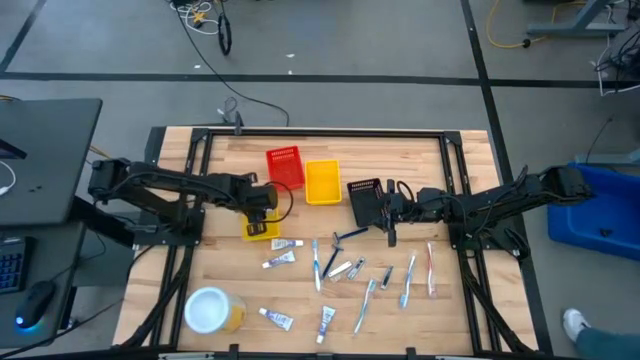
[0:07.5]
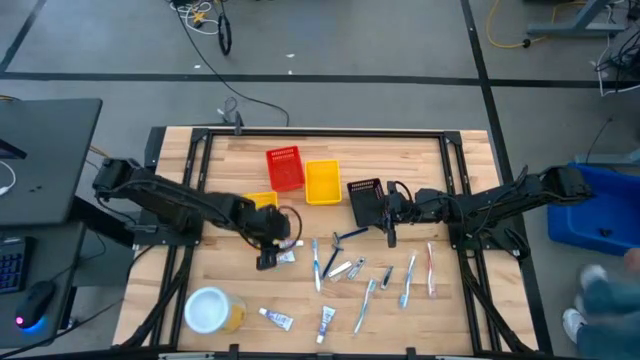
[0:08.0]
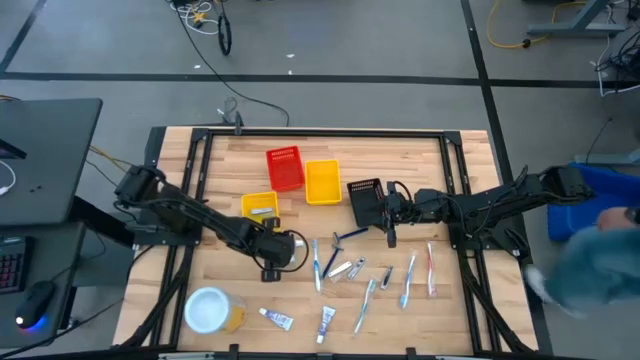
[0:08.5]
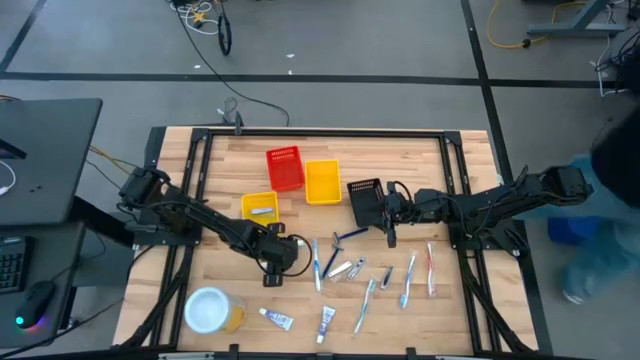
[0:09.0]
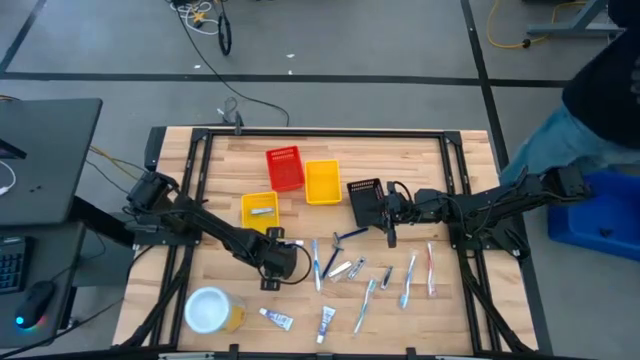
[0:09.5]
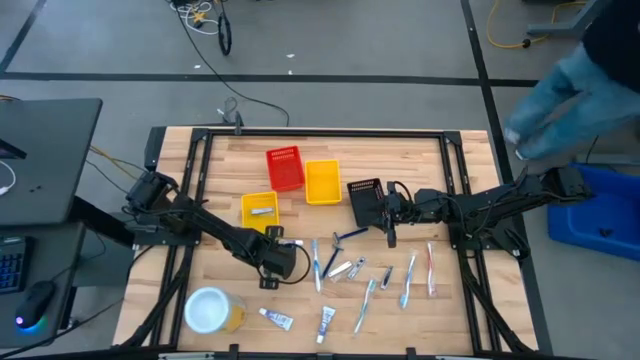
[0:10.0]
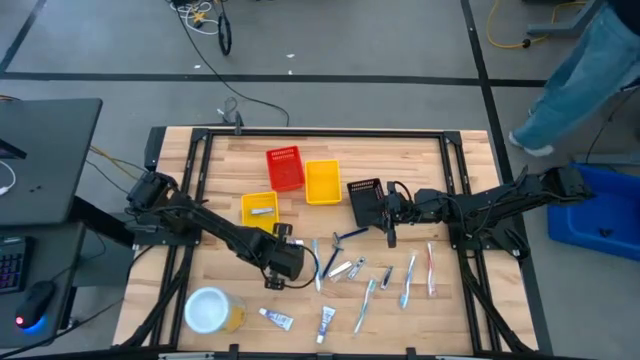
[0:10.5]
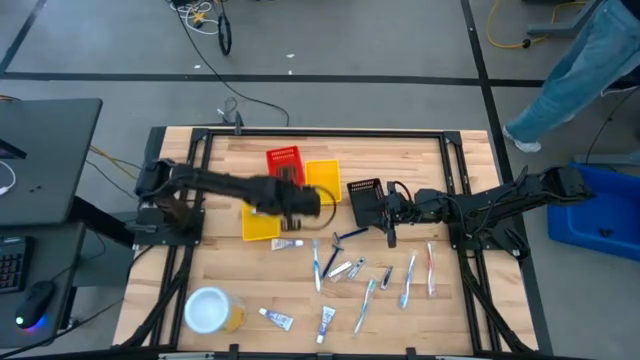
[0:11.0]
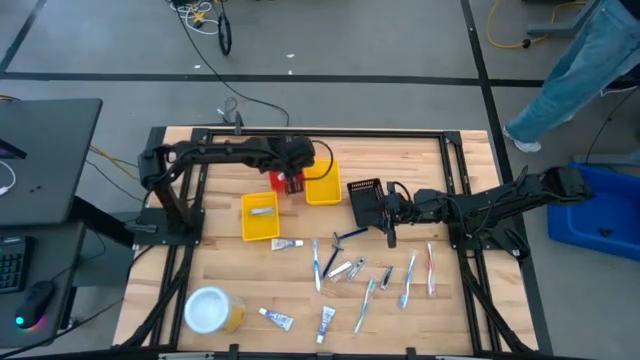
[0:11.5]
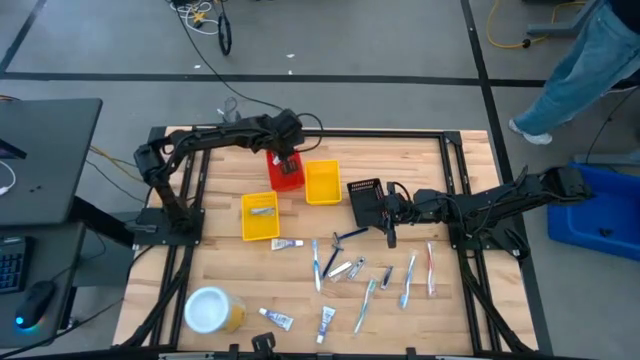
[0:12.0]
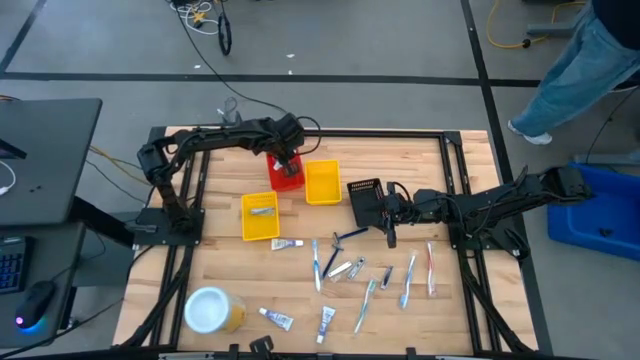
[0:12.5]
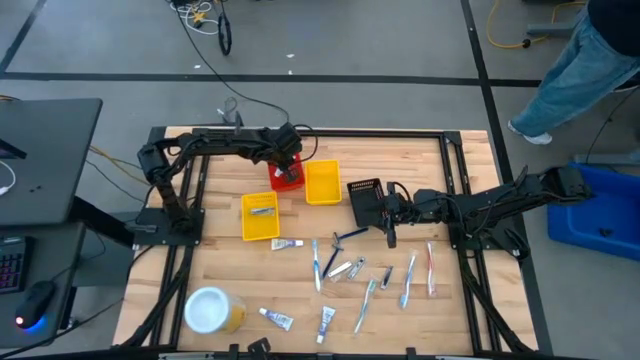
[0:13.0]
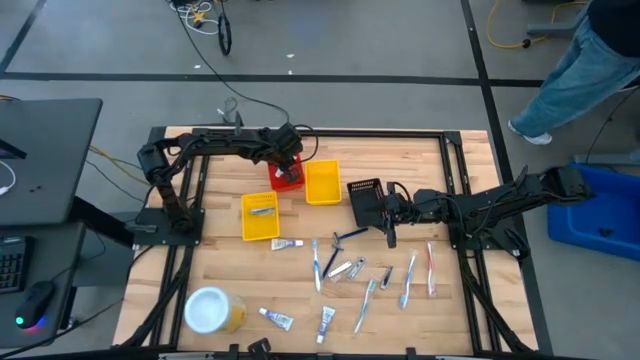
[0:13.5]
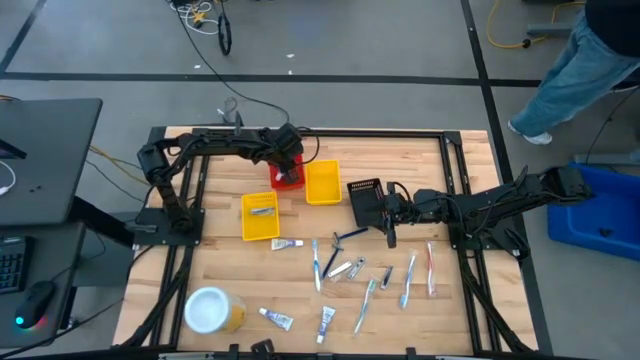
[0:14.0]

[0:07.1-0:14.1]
Task: Pick & Place Travel size toiletries
Put the toothpaste into the red bin

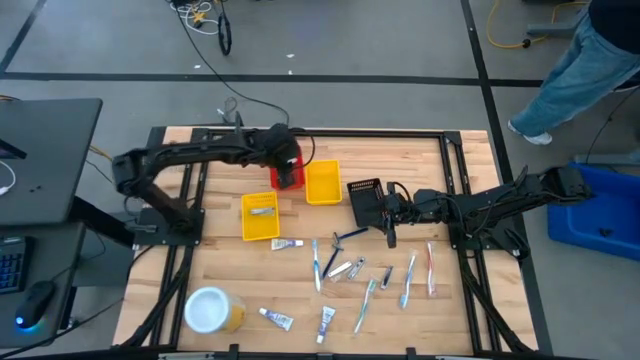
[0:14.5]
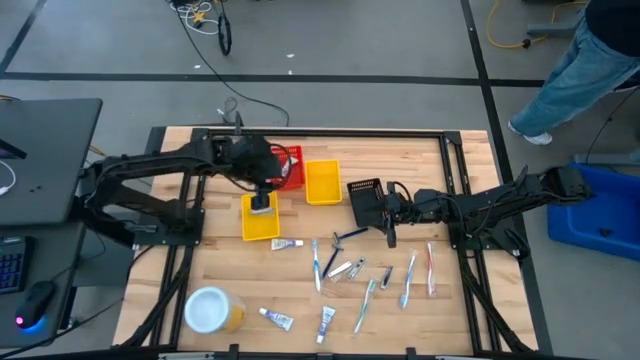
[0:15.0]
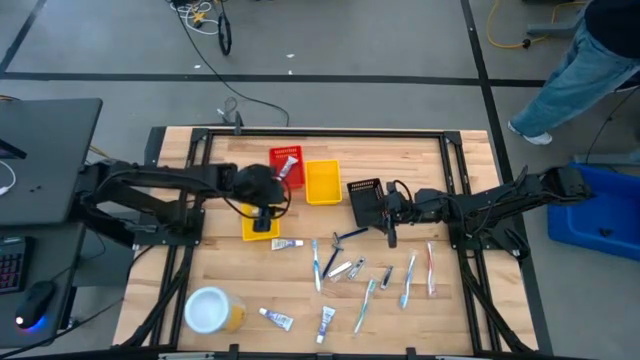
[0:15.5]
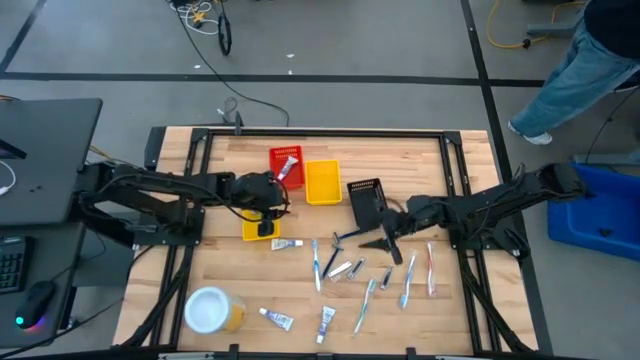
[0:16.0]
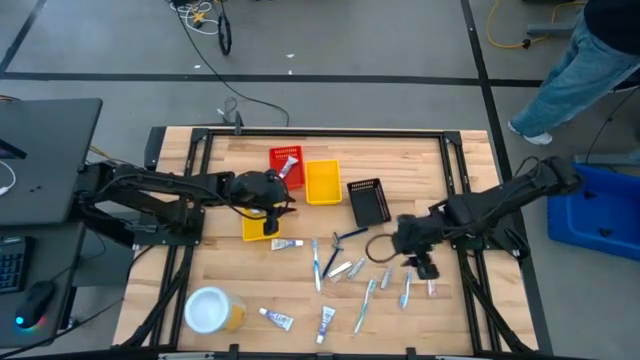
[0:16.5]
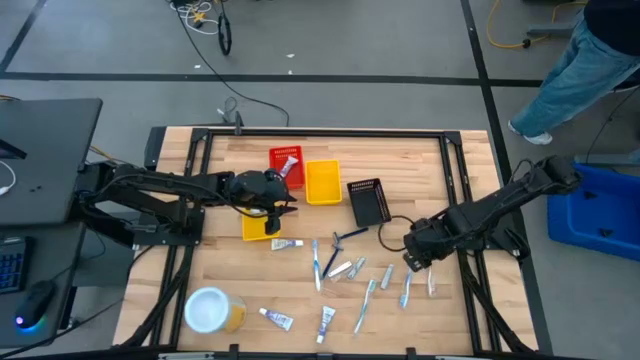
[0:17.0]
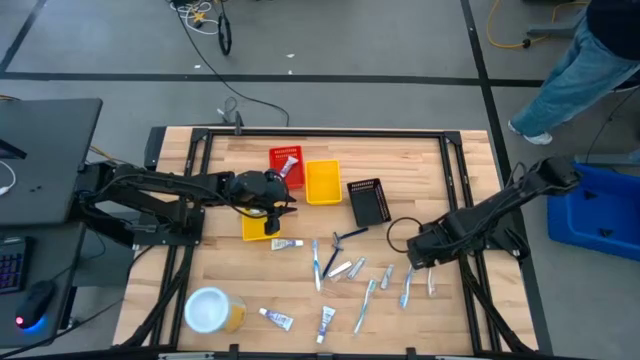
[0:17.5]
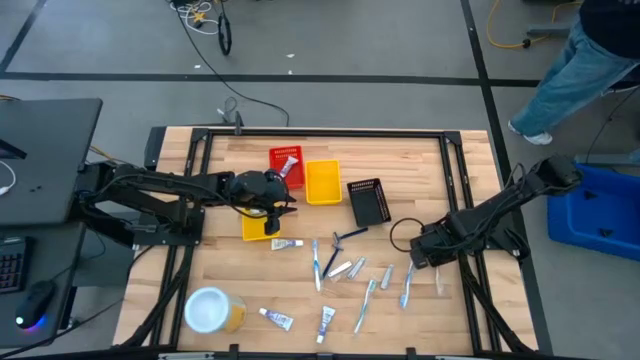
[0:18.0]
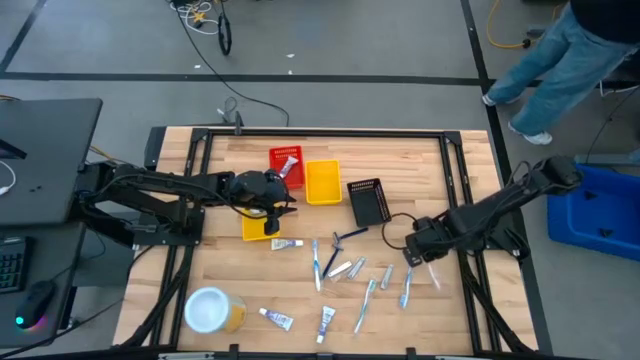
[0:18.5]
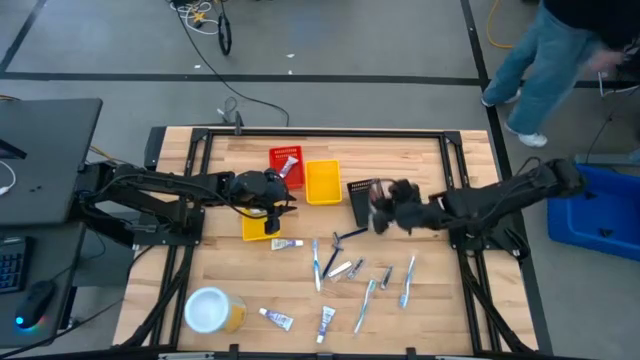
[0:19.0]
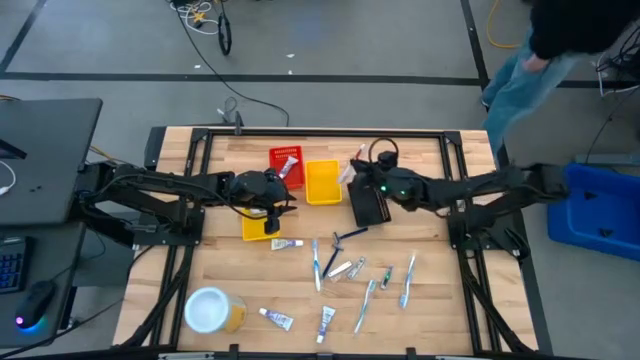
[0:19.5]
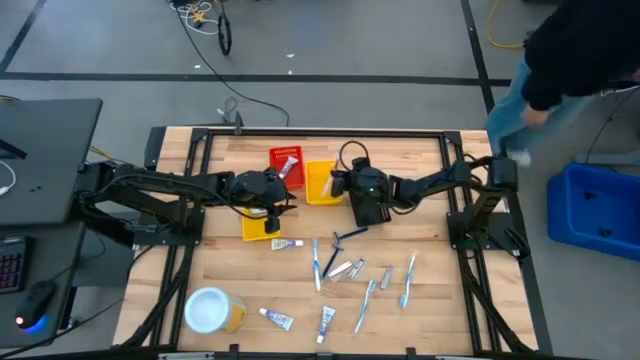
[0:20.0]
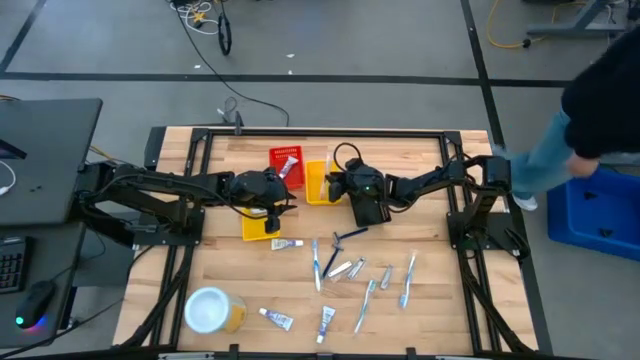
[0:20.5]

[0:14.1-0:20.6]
Put the orange toothbrush into the right yellow bin

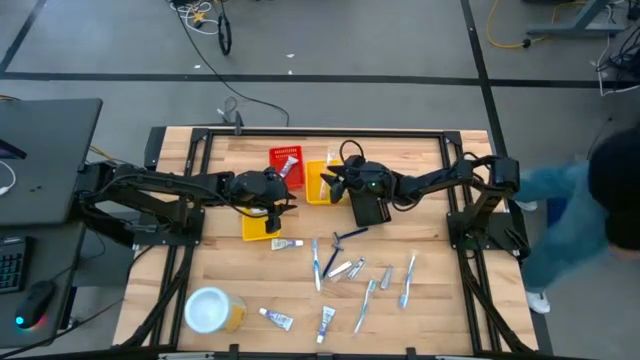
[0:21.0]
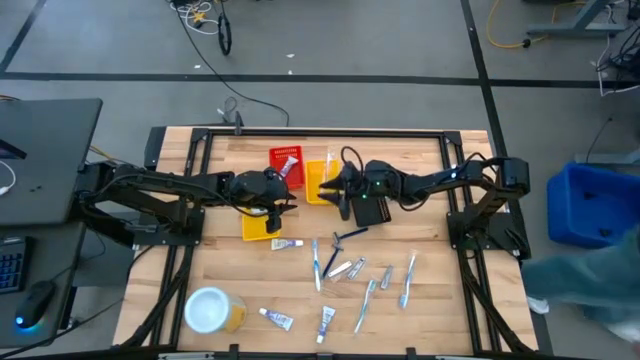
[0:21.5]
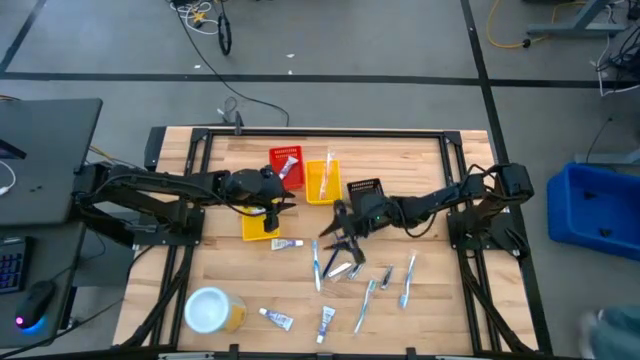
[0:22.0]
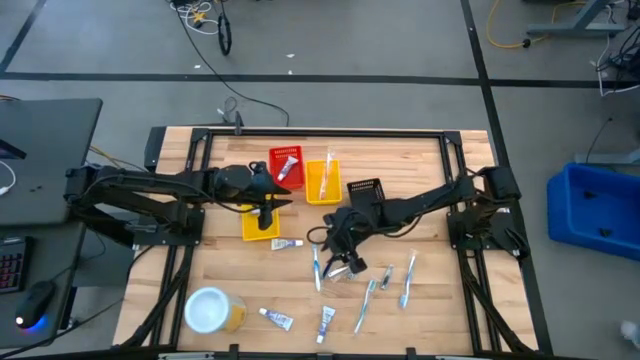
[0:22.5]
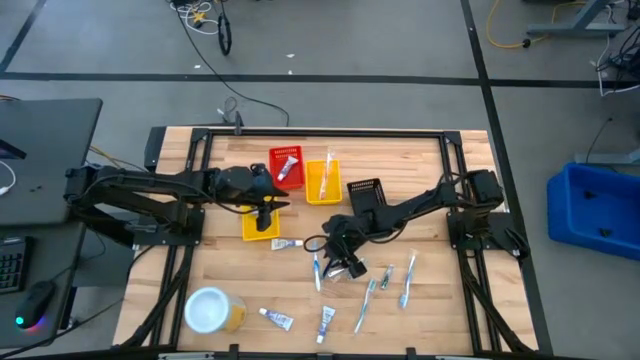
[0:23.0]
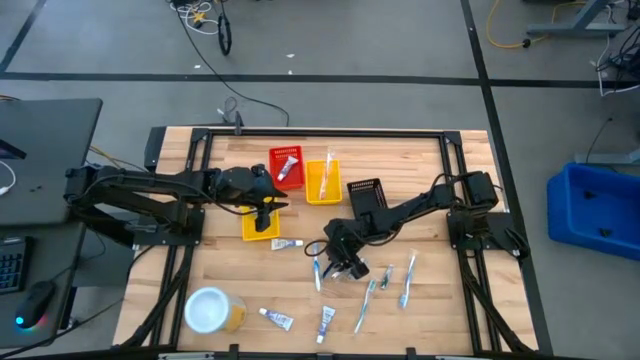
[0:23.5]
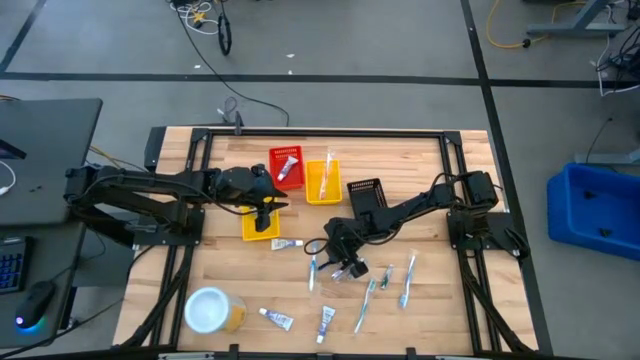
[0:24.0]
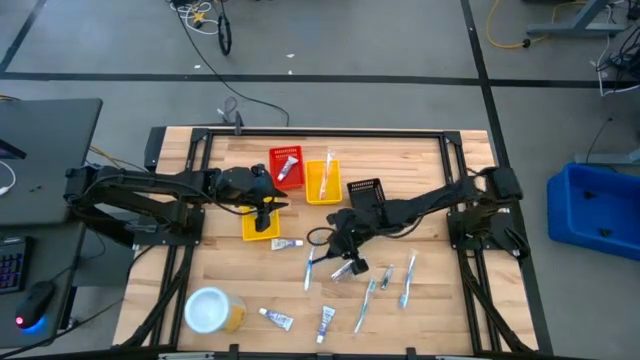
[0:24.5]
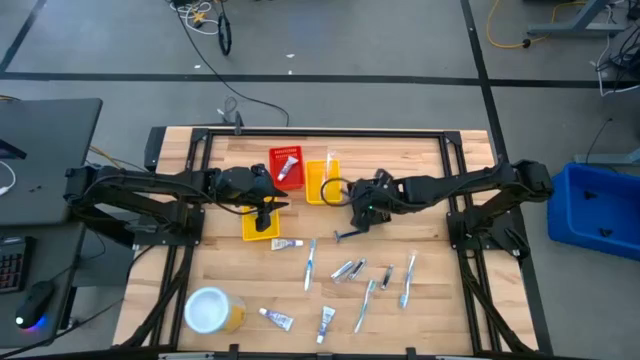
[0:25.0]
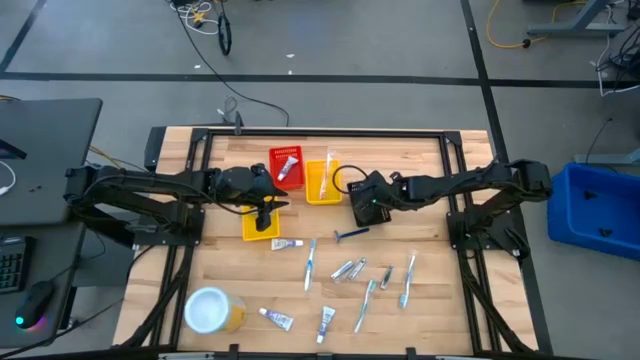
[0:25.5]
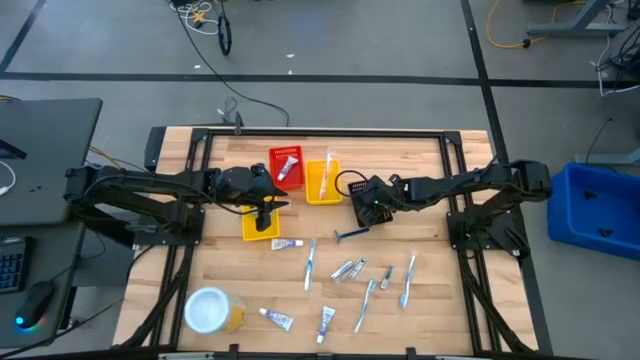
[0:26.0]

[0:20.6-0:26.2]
Put the blue razor into the black bin

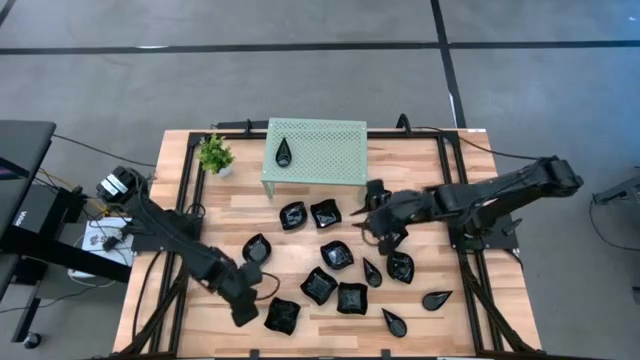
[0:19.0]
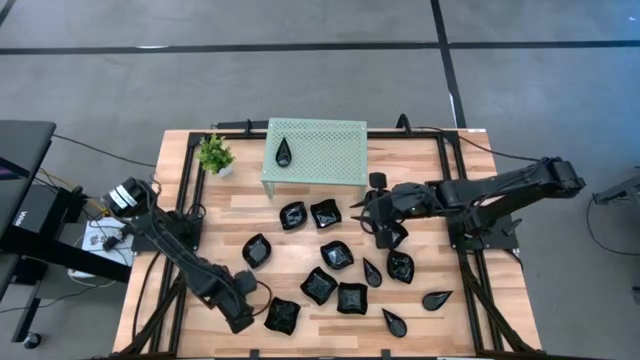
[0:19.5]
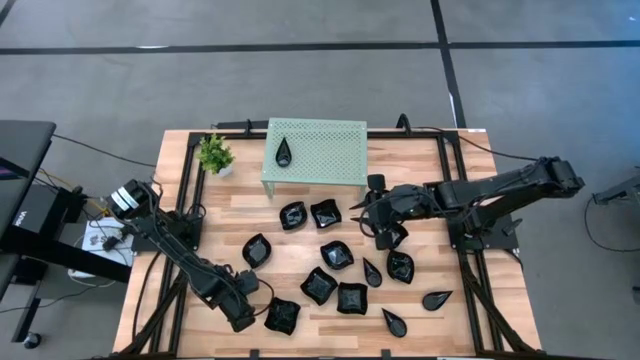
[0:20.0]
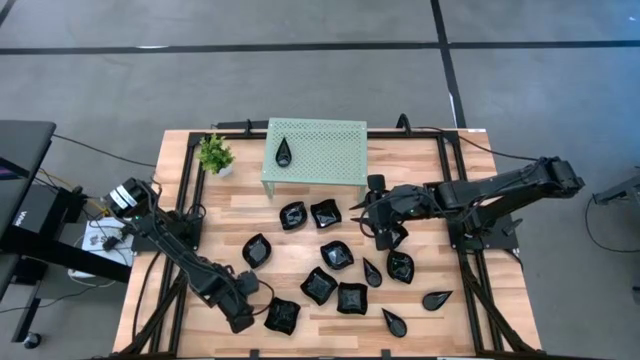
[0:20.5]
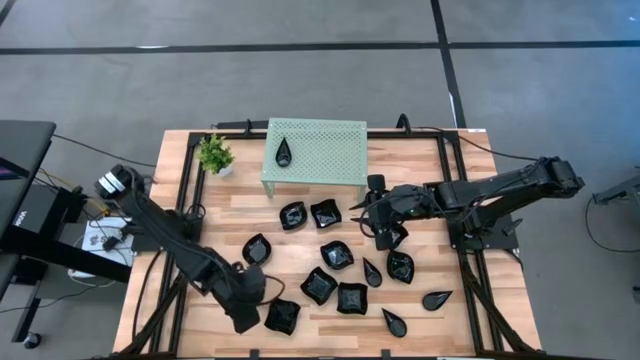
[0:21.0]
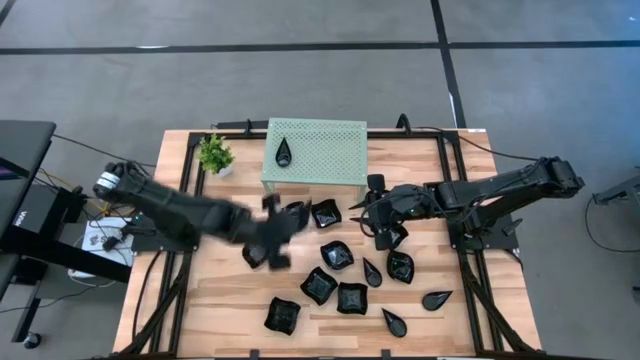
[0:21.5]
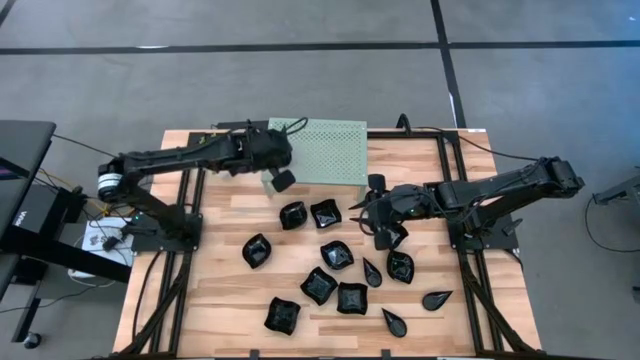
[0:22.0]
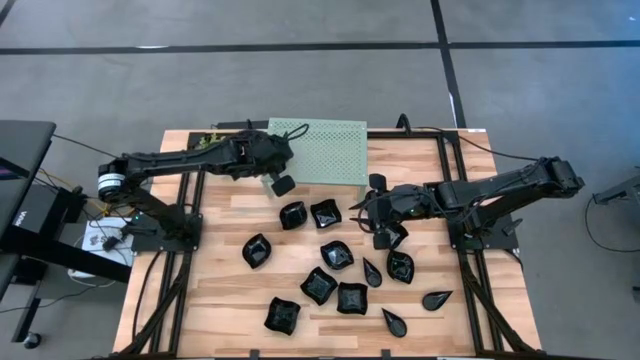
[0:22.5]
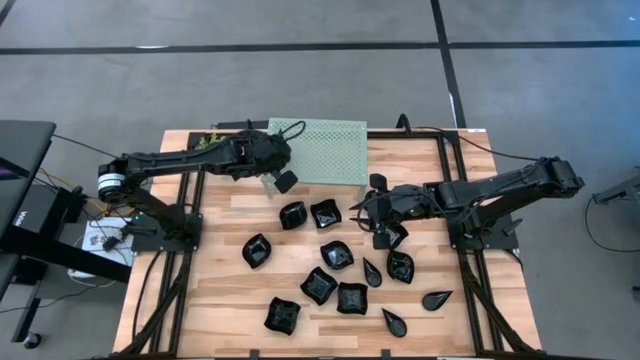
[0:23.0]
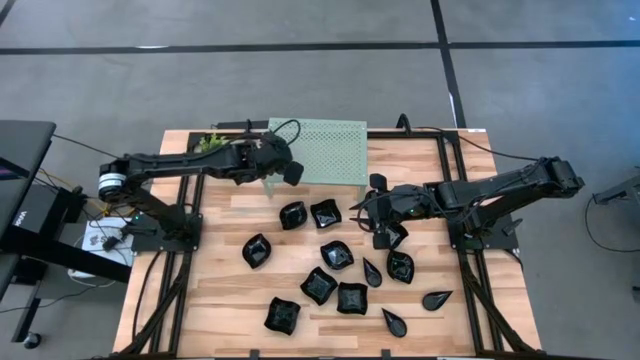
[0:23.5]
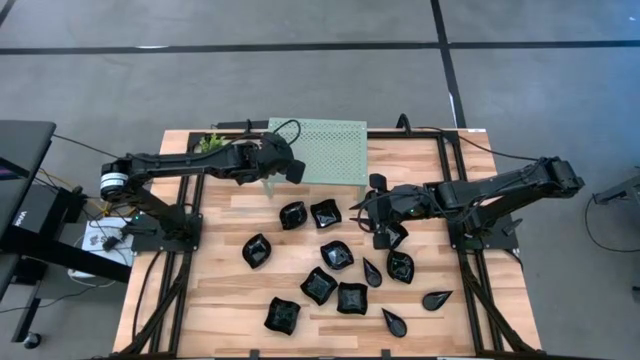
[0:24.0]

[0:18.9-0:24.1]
Task: Pick & Place Mini shaped plates
Stack the drop shaped plate on top of the other drop shaped plate on the shelf
